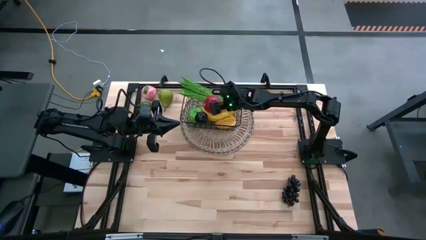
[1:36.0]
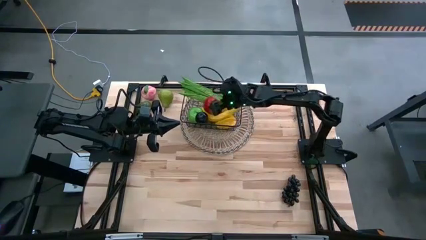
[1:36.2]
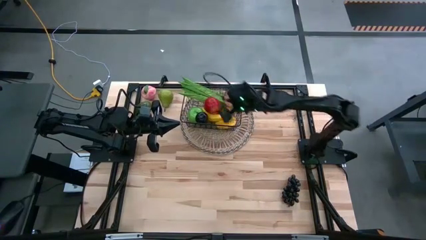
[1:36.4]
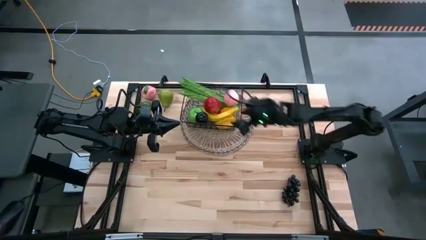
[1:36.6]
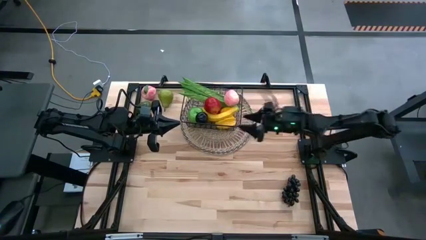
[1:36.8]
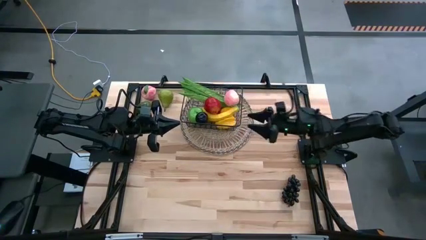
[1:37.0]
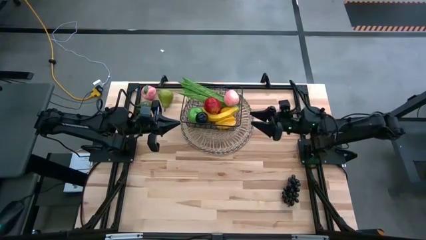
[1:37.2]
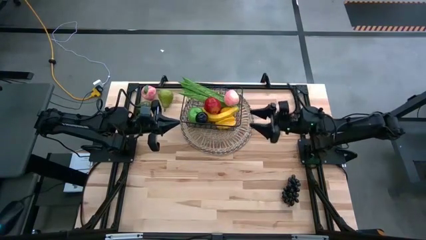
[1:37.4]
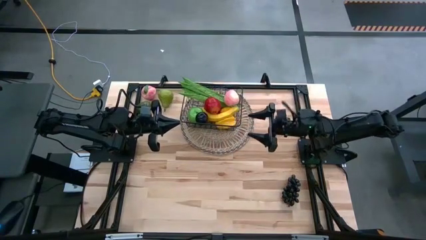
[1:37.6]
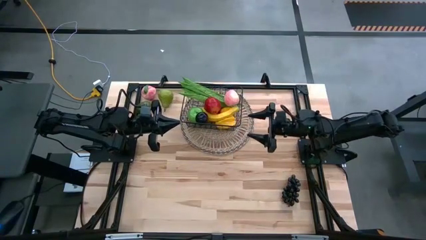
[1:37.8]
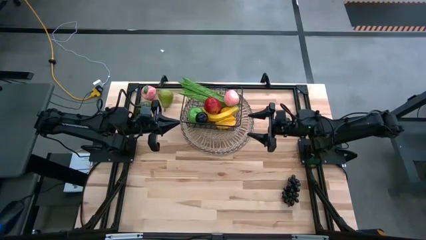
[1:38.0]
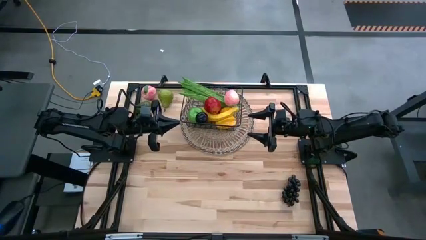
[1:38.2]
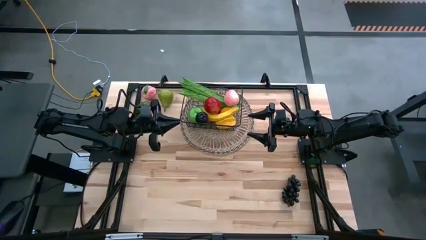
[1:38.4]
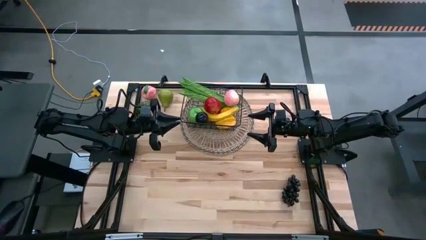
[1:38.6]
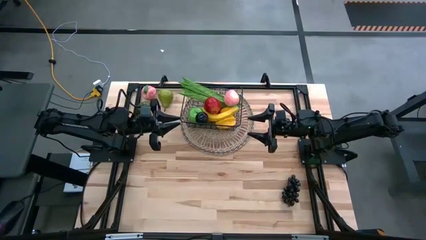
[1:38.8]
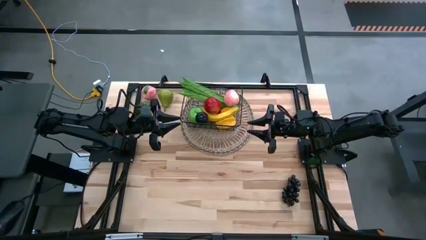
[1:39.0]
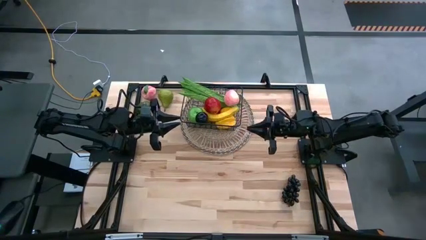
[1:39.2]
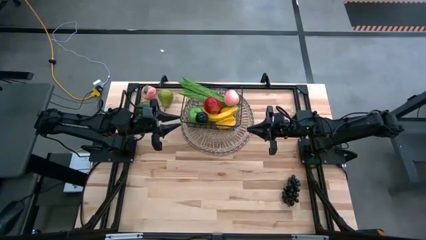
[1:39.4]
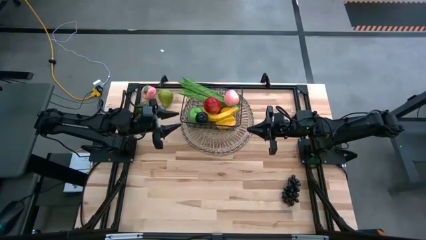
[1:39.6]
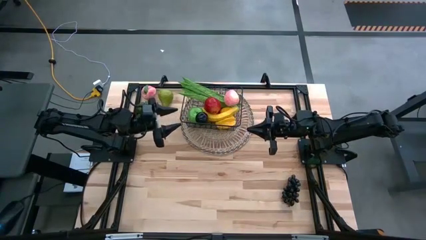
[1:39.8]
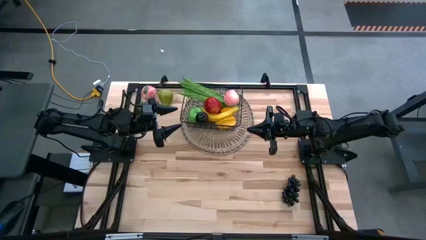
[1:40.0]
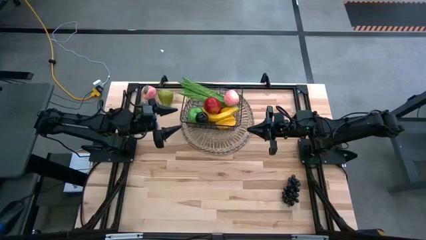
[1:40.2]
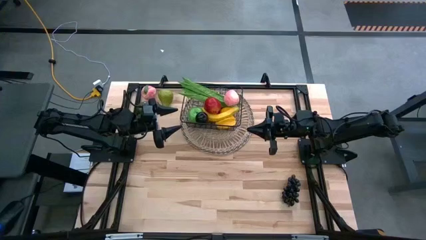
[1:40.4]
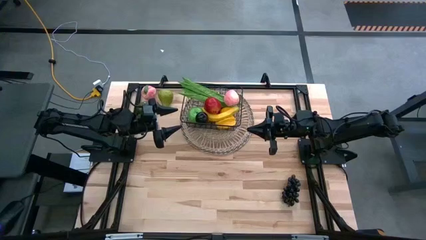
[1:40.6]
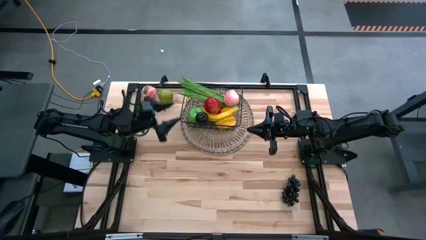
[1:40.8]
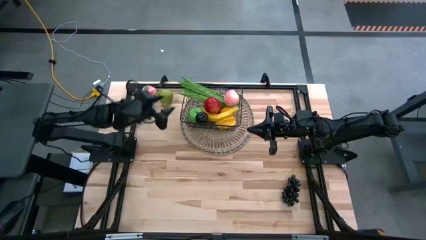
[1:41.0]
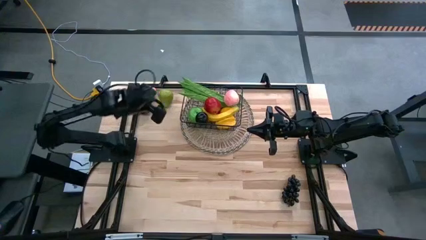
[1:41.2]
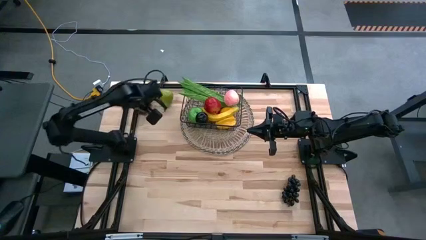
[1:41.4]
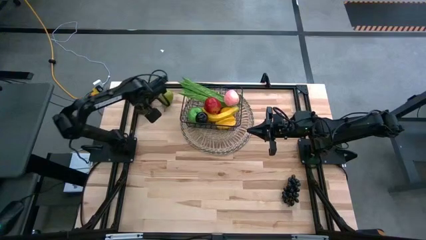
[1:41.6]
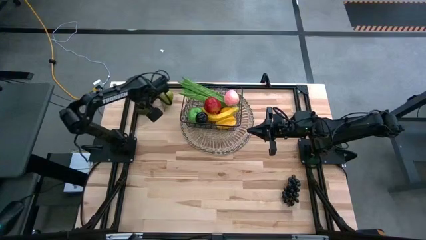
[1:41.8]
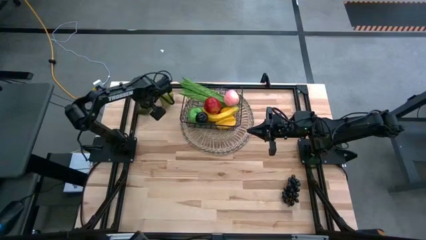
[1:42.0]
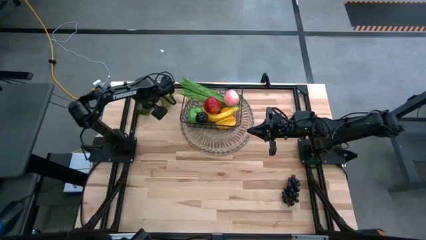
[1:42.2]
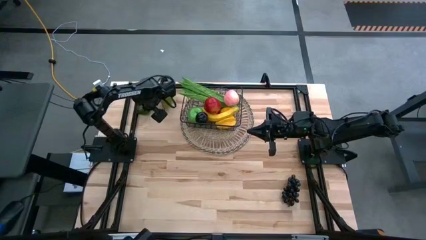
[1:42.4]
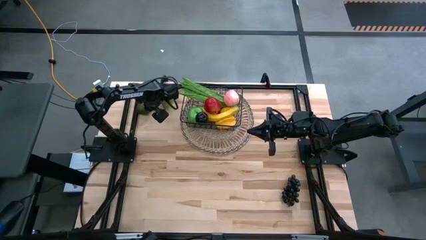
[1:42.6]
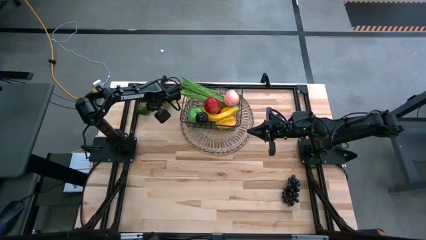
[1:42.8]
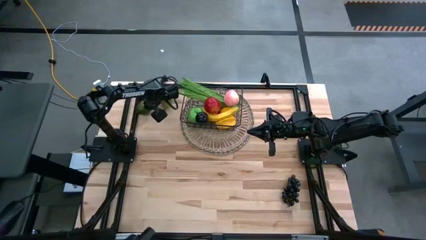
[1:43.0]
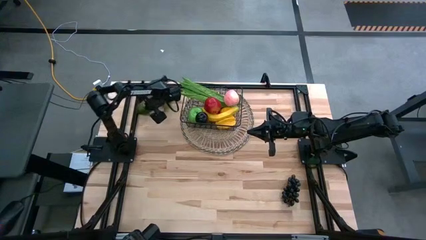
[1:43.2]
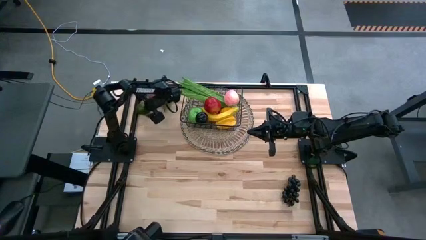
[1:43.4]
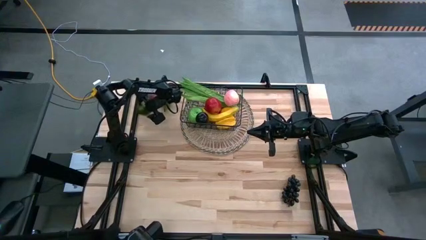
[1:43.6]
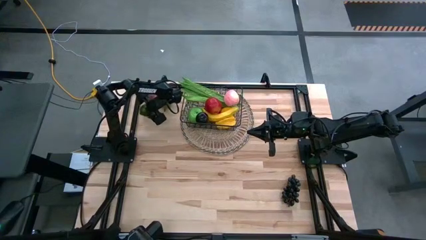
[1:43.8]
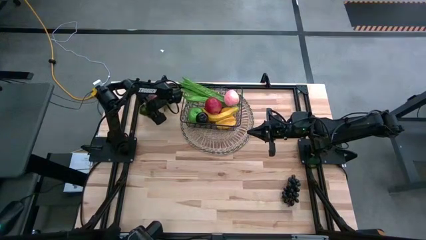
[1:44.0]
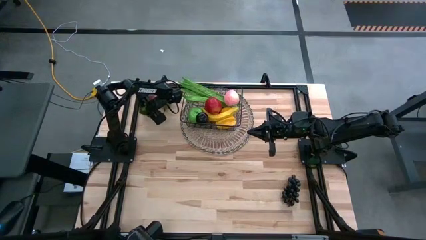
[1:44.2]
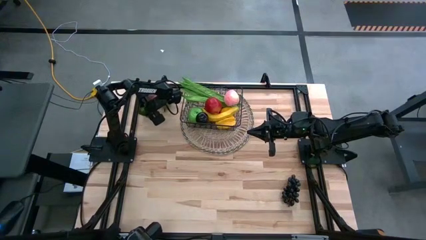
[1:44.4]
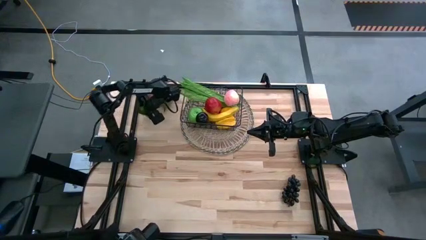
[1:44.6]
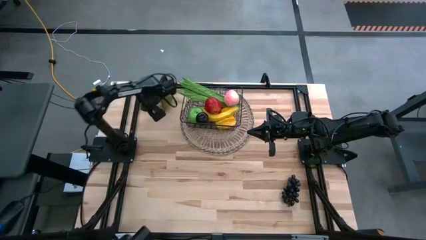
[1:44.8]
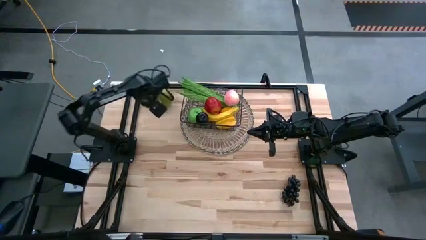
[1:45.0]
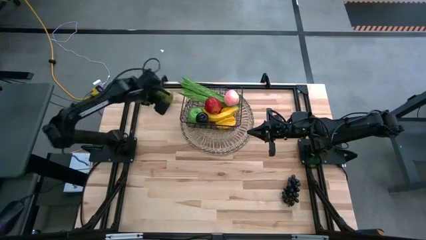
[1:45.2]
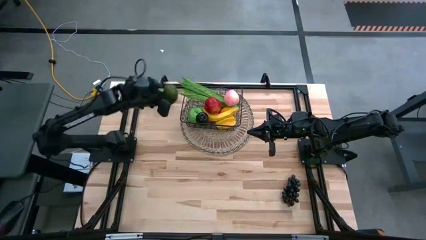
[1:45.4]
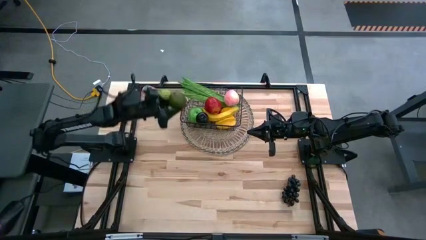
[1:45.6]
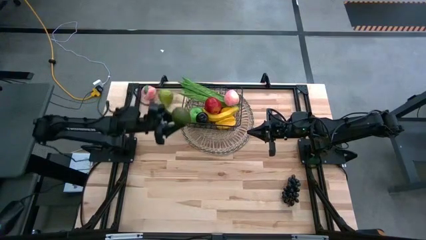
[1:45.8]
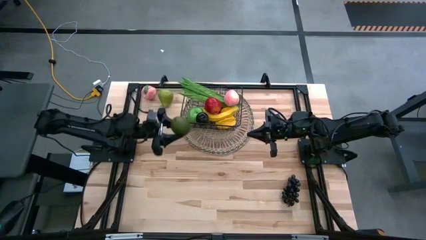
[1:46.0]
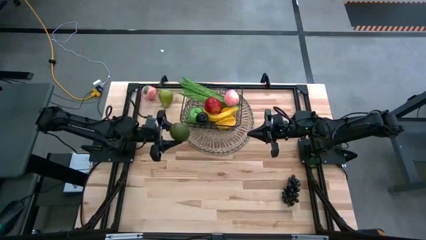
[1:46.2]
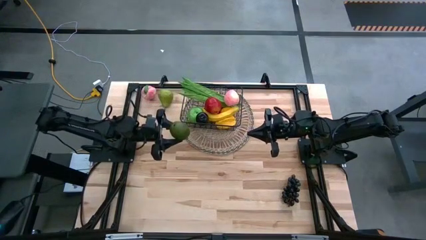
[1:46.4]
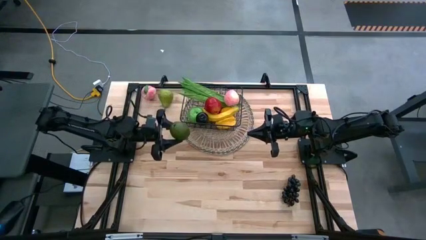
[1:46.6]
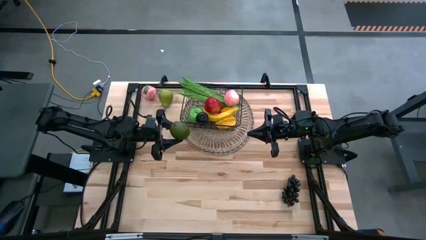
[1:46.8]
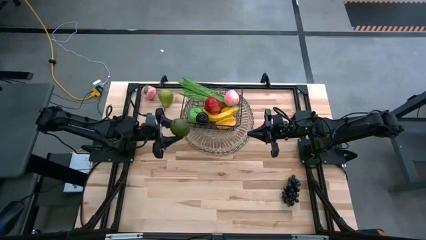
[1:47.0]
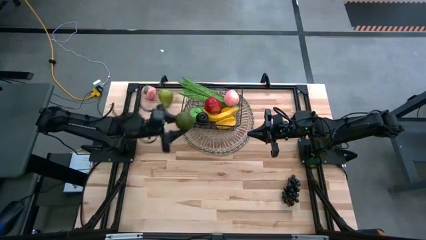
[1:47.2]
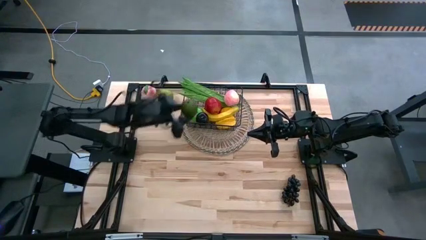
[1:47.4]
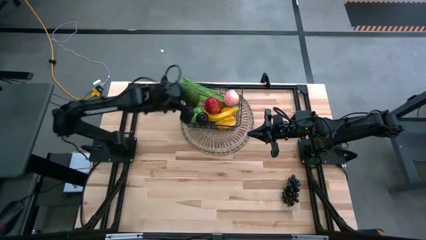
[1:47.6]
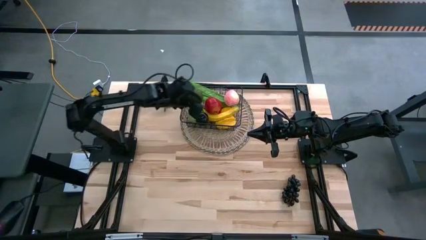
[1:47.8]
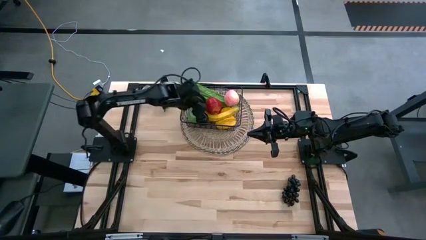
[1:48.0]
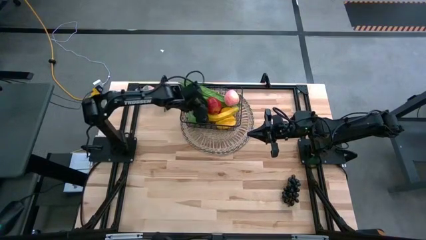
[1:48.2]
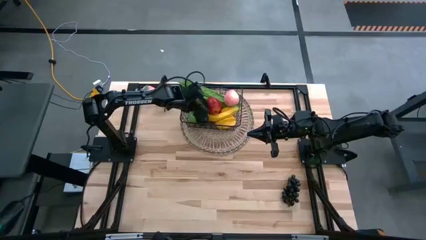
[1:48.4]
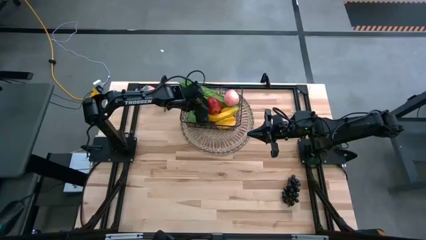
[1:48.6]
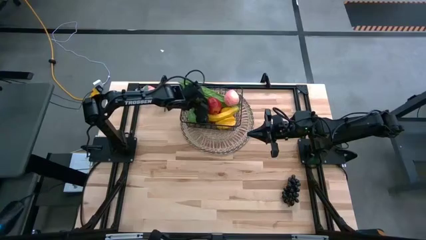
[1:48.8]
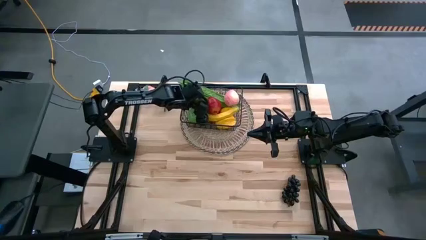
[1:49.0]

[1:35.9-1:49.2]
Task: Build produce basket
Put the lime into the black wire basket

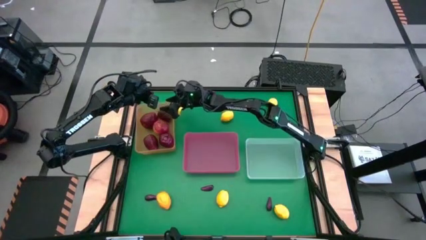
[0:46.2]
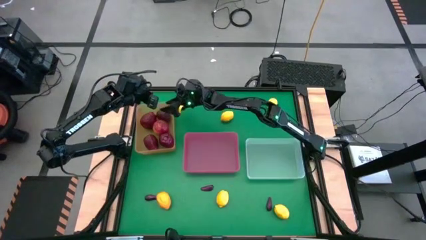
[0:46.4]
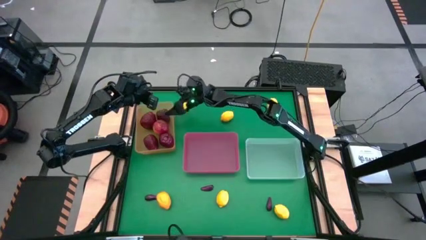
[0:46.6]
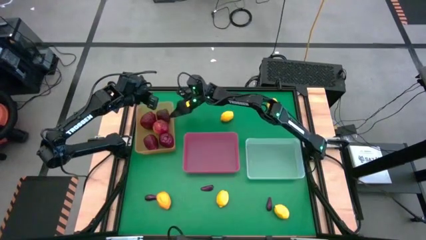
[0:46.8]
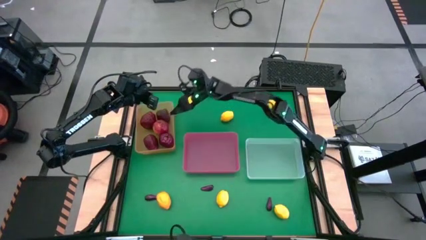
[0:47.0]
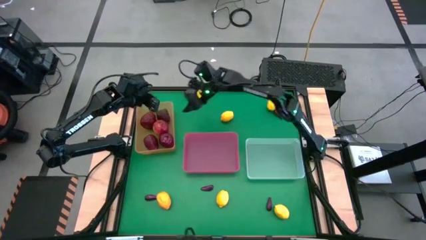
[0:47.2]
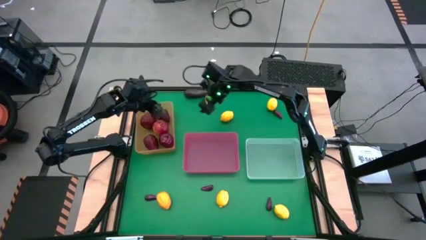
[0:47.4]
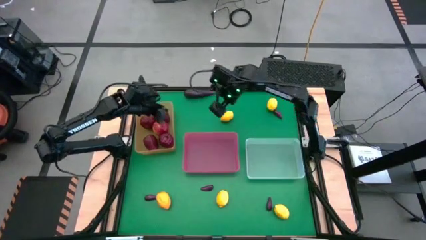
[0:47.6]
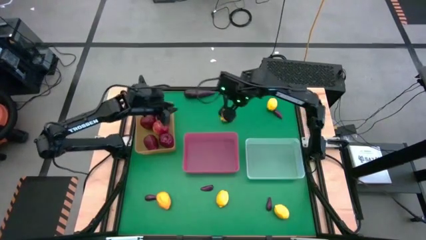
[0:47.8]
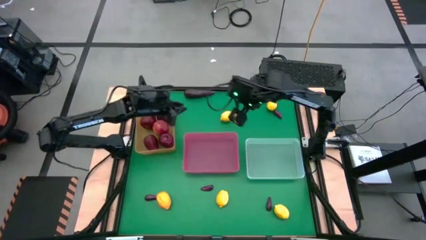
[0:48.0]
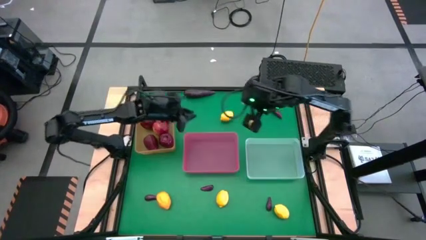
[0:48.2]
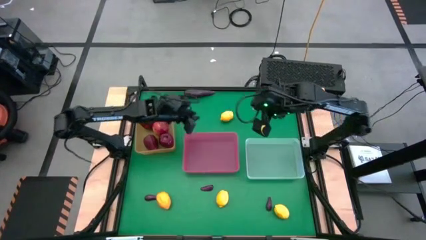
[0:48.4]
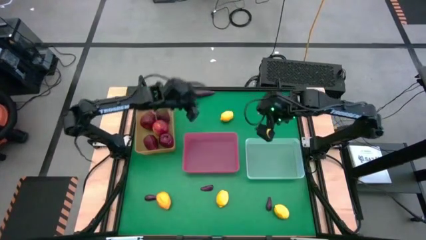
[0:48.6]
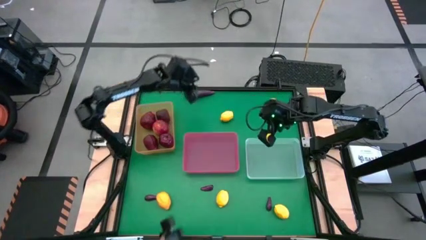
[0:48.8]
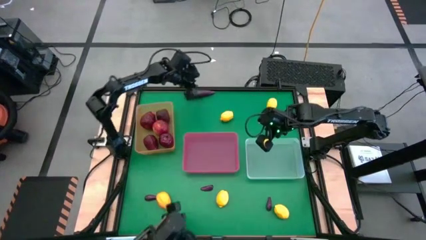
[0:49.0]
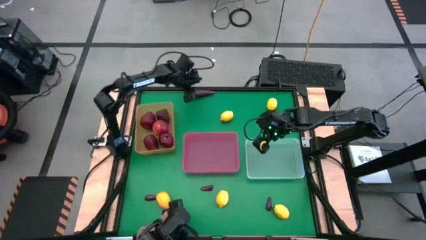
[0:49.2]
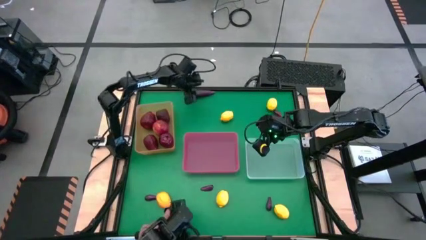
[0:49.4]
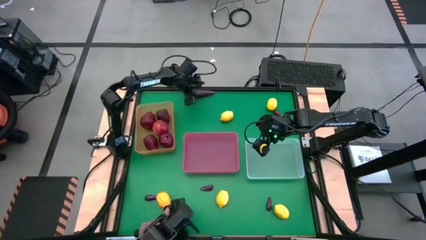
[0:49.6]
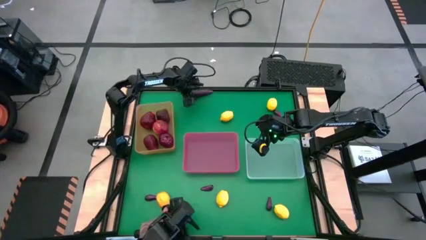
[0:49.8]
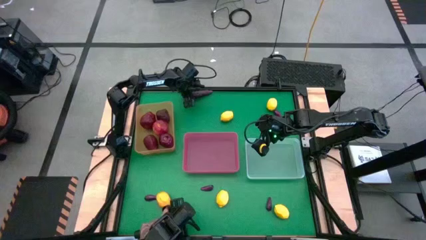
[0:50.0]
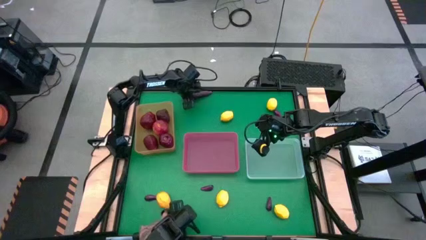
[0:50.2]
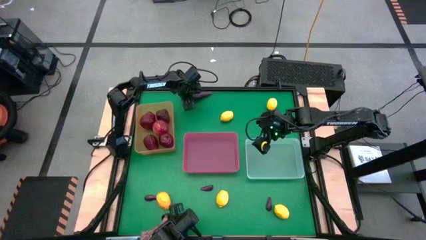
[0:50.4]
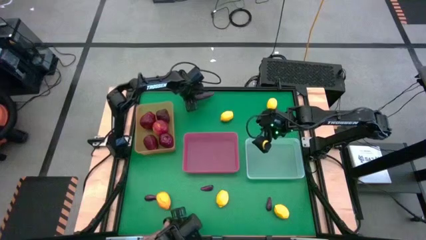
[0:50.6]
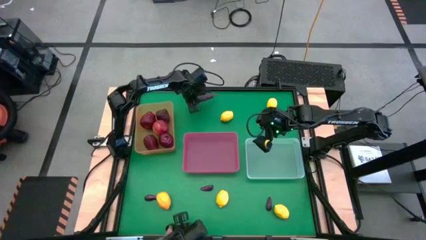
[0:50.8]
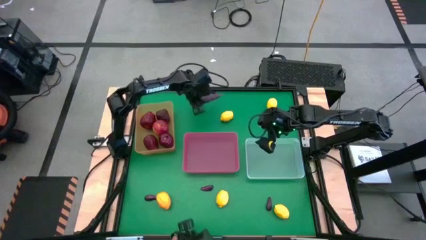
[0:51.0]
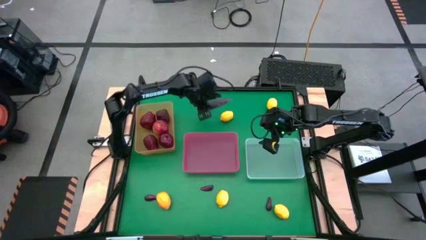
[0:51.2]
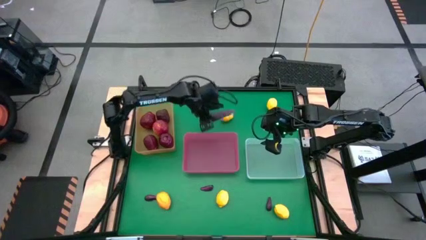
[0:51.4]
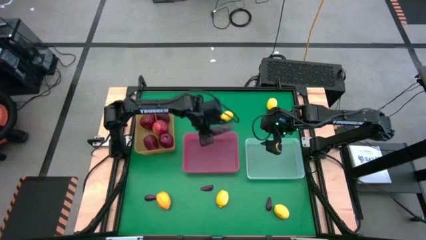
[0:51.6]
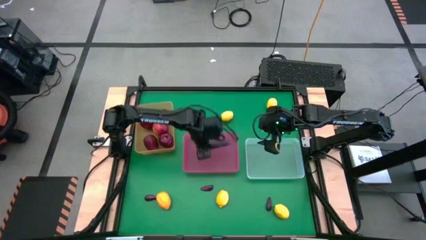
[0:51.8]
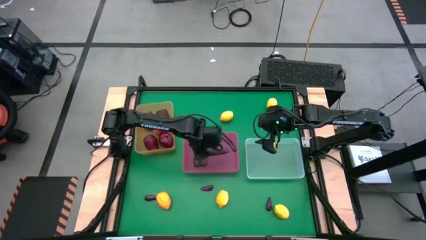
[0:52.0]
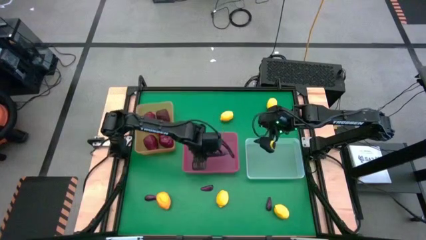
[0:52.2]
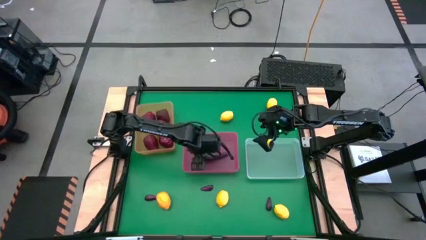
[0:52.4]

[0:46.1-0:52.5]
Task: Sort produce into baskets
Put the violet eggplant into the pink bin
